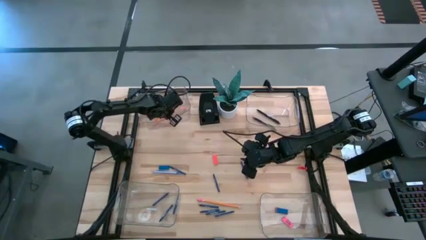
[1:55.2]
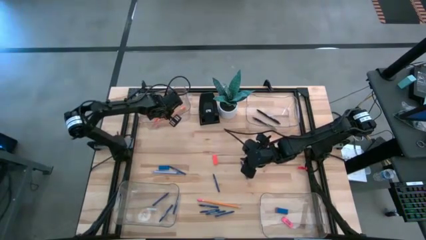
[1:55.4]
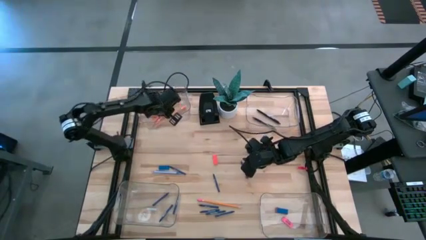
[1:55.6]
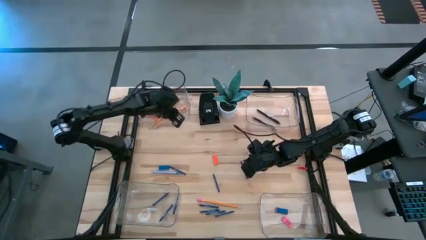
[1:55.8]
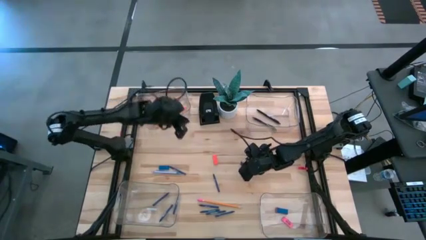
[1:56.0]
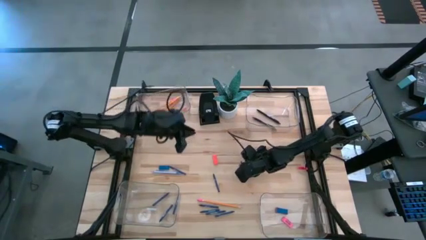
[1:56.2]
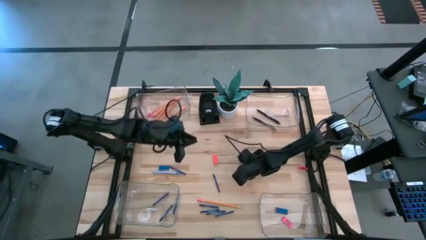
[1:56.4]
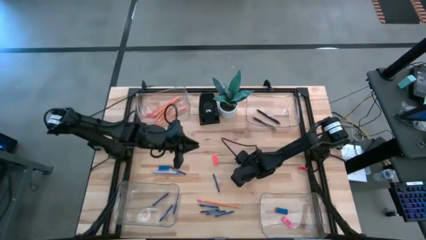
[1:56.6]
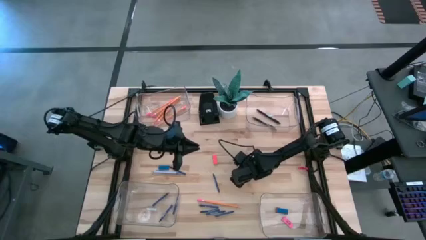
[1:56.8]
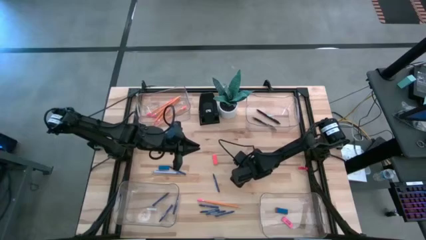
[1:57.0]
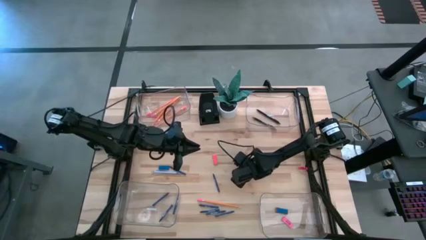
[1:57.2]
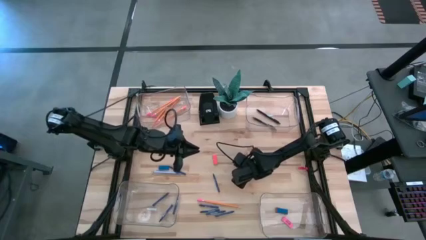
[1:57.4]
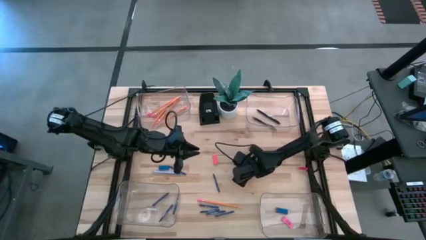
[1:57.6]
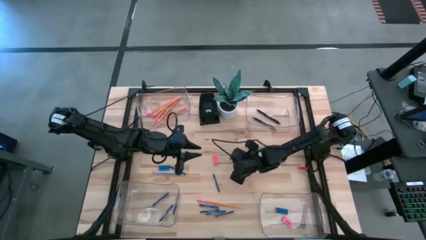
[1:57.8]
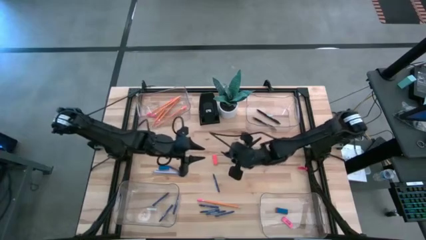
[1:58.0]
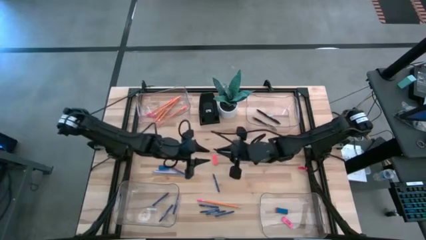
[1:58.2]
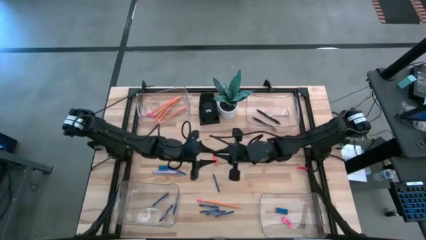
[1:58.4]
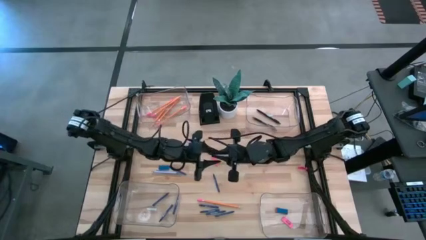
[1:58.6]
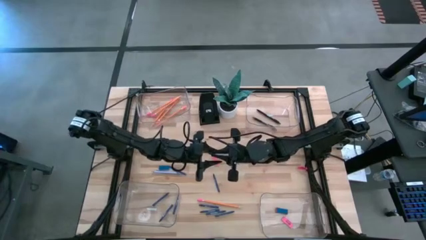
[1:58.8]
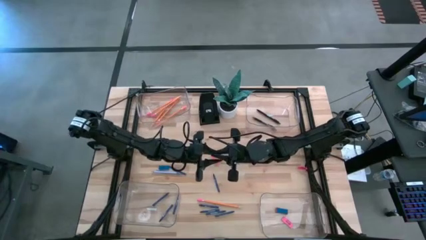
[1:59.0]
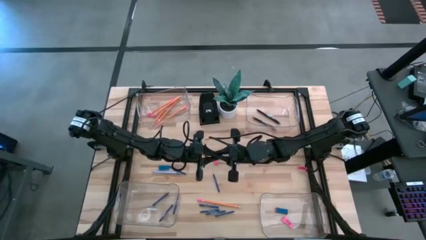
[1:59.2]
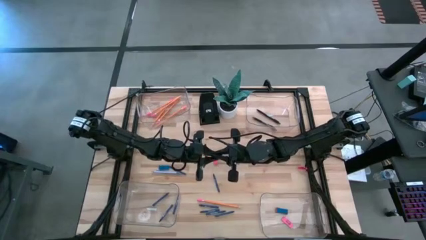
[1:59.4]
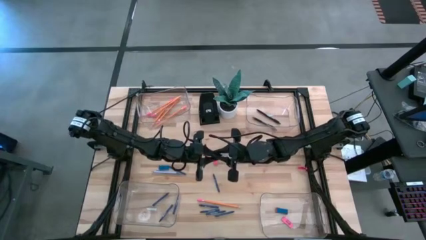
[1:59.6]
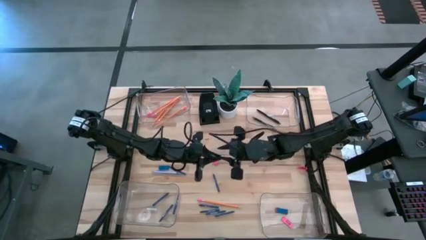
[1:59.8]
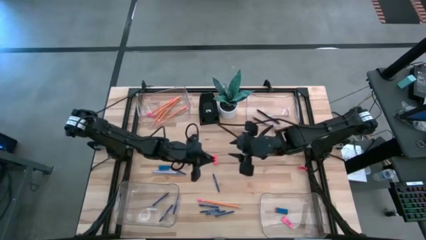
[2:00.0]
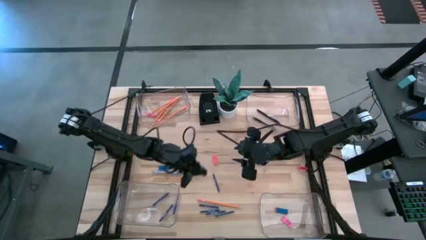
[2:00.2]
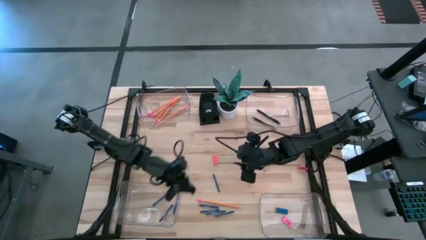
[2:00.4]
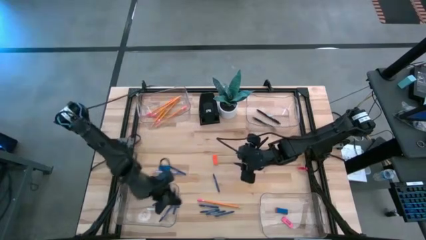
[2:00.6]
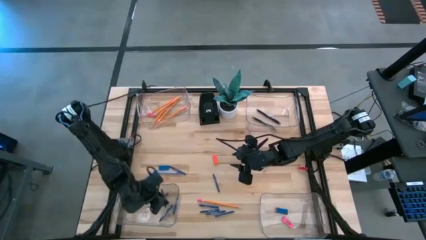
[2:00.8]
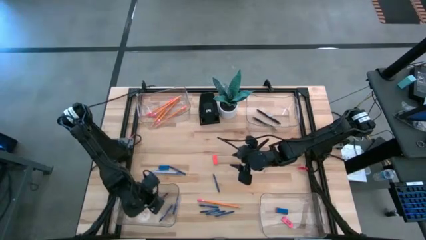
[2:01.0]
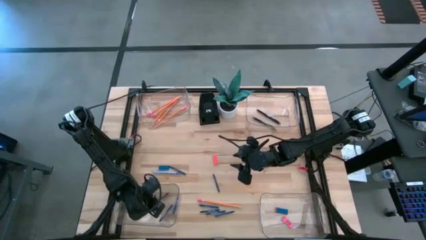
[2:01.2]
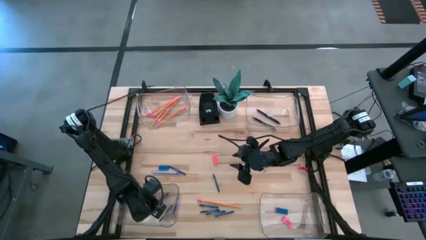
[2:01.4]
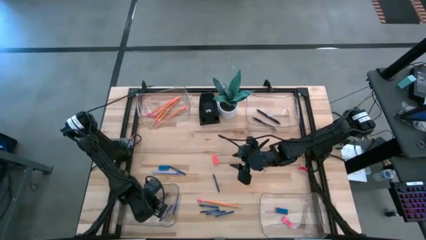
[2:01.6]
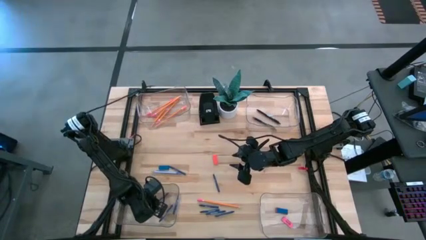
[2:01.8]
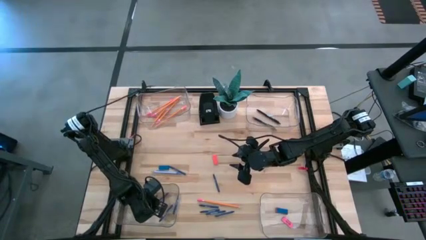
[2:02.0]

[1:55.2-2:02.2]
Task: Sort crayons/erasers/pens/pencils in bins
Put the blue crayon into the bottom left transparent bin

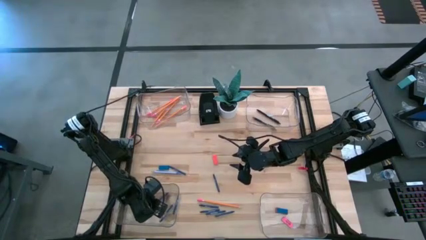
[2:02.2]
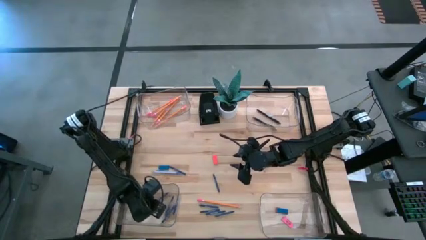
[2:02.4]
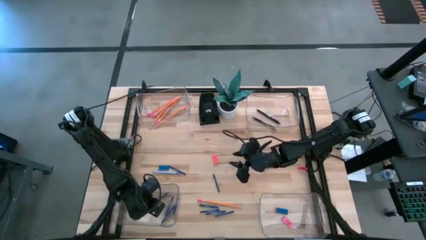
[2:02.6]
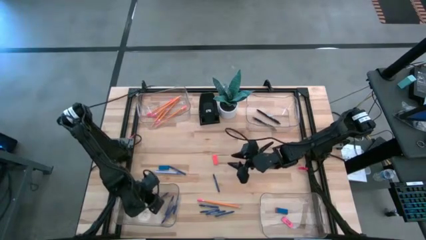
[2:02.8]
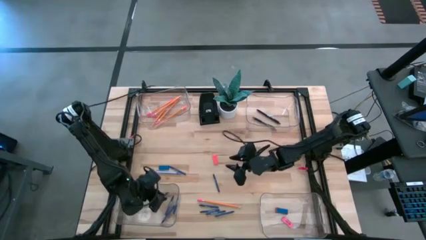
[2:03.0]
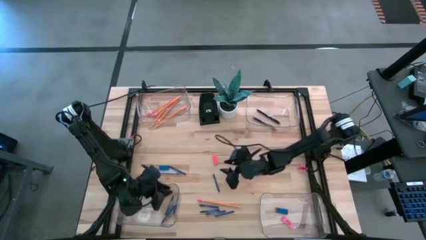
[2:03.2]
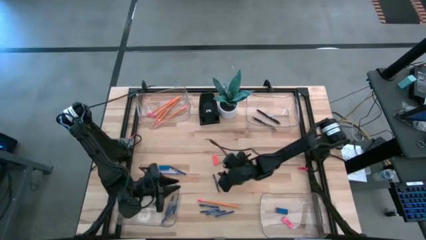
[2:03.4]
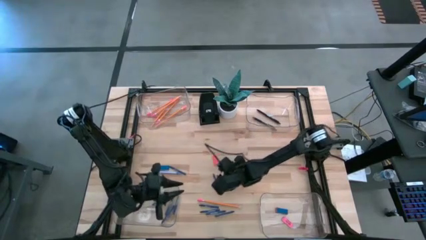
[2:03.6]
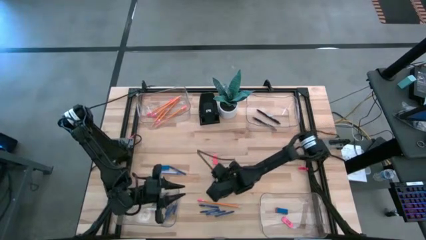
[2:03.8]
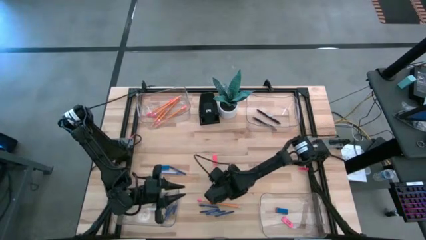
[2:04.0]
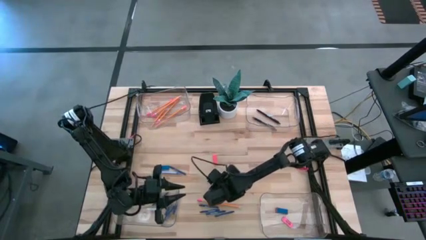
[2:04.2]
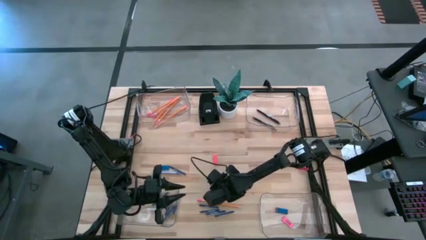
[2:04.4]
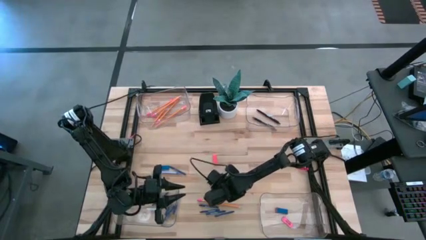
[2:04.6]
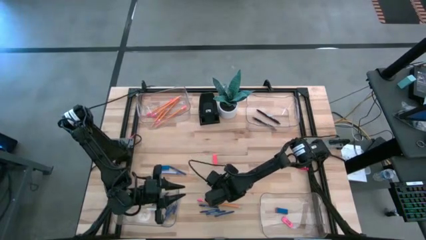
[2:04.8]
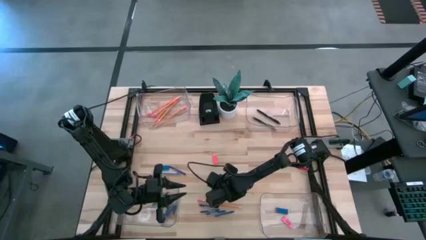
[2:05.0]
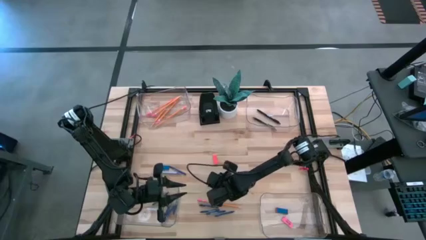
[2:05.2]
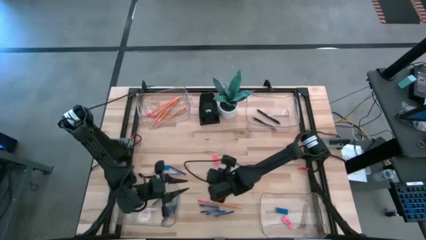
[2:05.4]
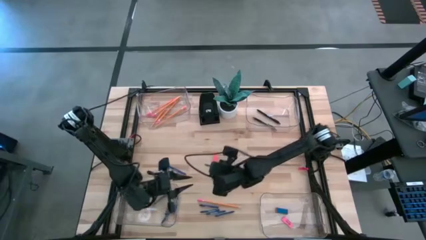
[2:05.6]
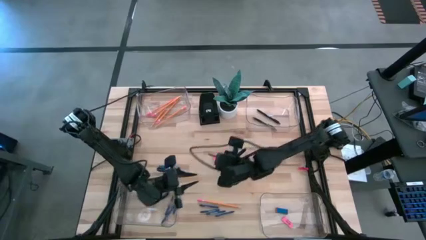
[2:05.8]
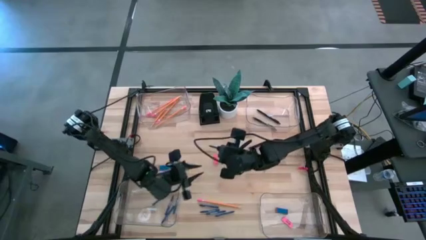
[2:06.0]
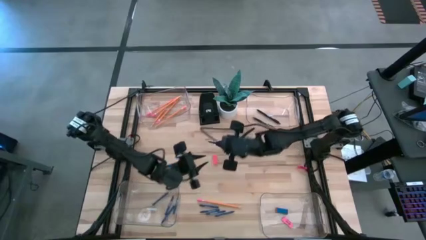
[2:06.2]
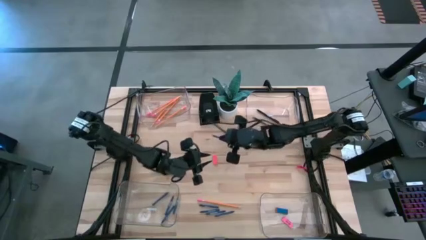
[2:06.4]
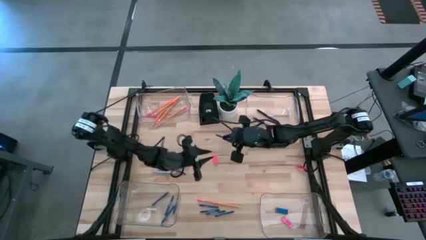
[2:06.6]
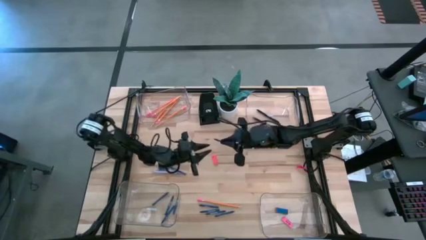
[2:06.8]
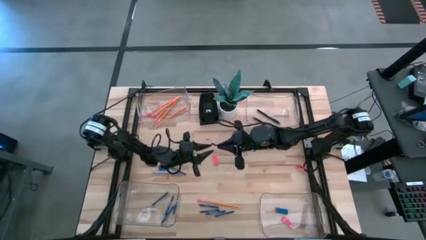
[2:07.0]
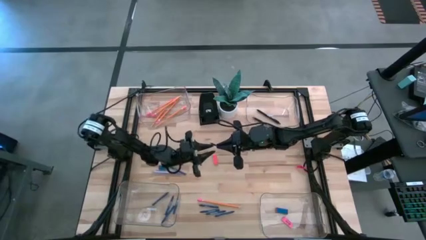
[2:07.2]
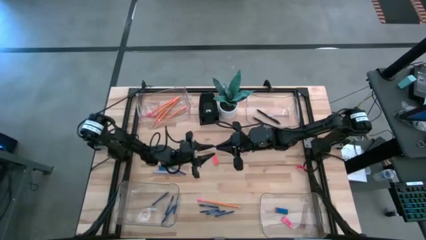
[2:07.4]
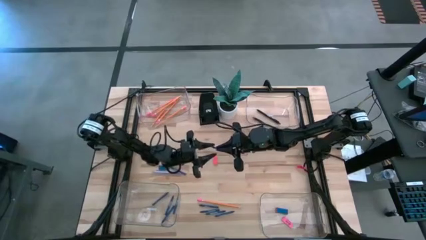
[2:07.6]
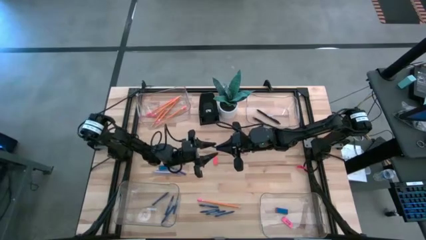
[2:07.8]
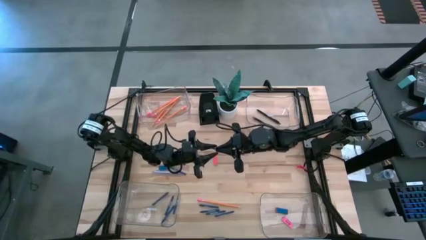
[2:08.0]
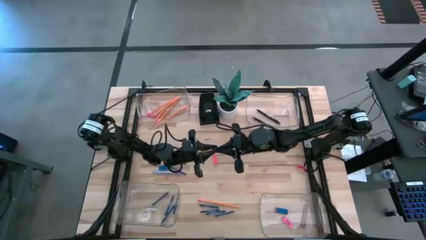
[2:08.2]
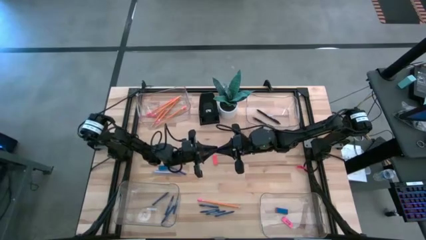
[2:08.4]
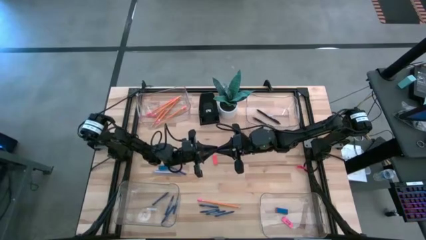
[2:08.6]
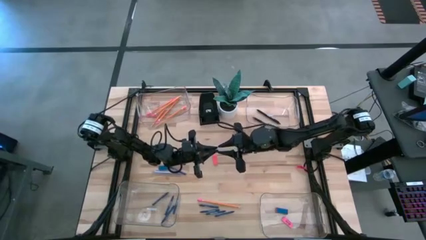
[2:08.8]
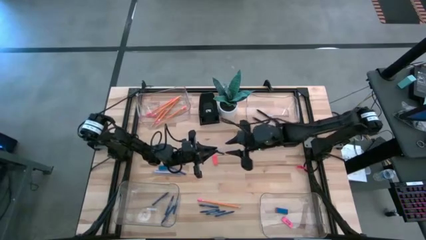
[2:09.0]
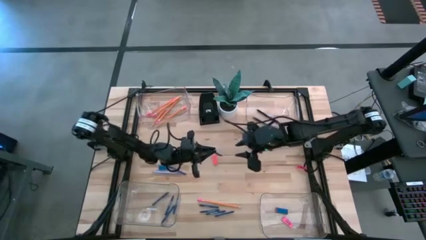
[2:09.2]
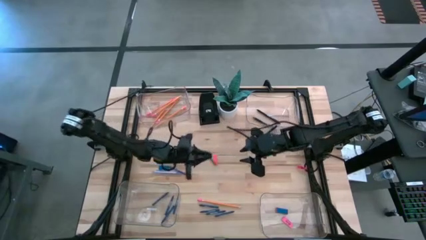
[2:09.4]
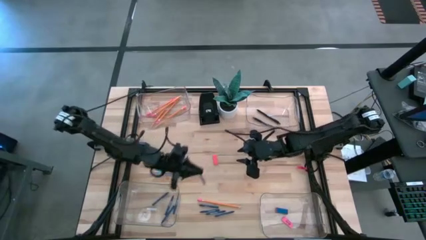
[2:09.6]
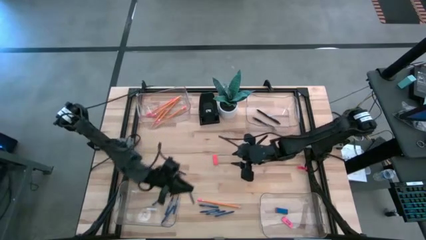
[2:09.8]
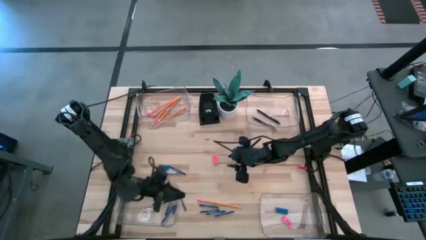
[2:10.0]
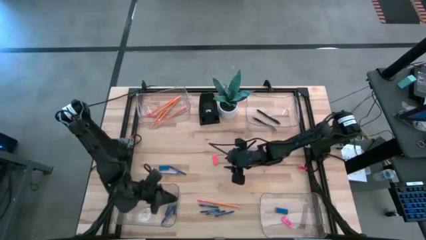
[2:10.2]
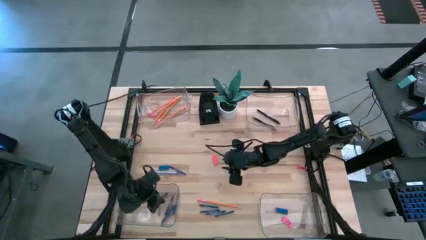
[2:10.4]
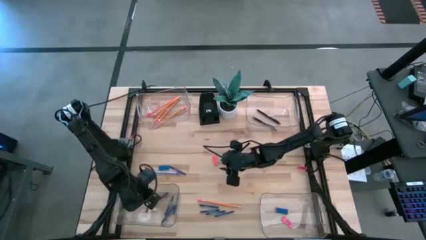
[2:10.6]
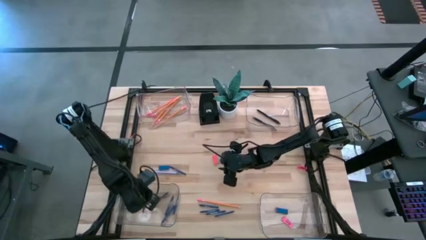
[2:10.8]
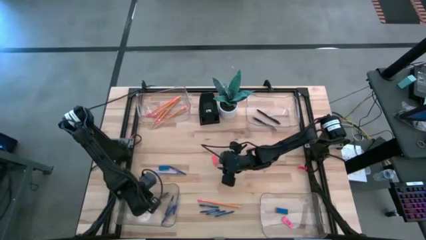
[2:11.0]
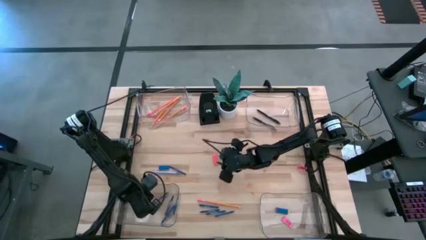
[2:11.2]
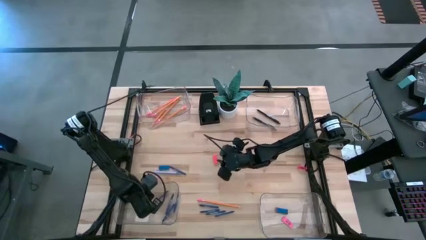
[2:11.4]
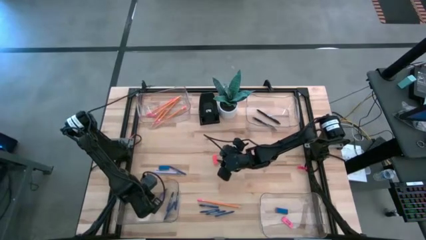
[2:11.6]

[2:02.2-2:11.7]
Put the blue crayon into the bottom left transparent bin
